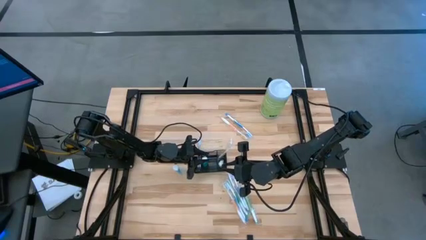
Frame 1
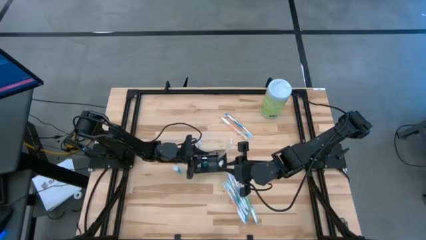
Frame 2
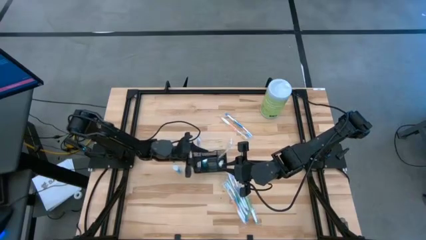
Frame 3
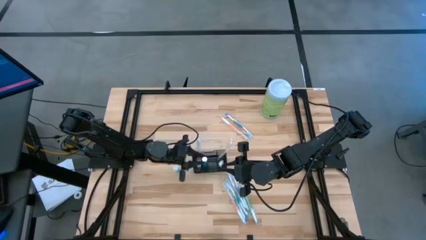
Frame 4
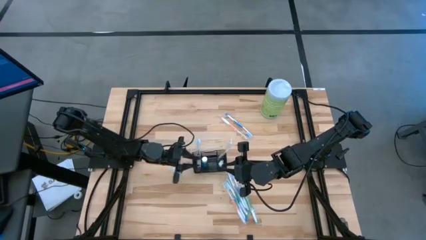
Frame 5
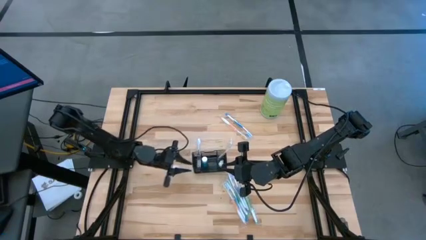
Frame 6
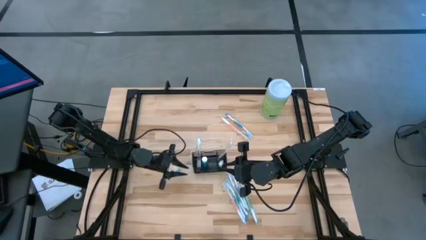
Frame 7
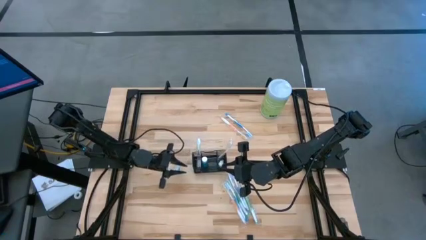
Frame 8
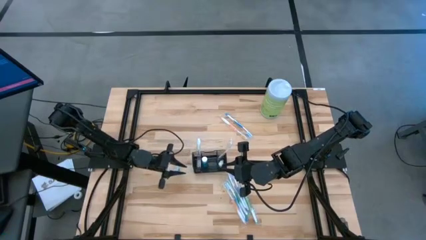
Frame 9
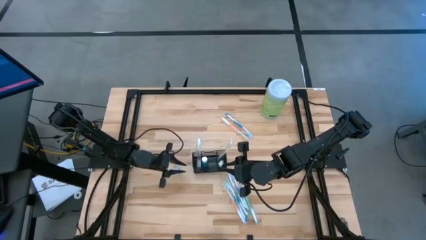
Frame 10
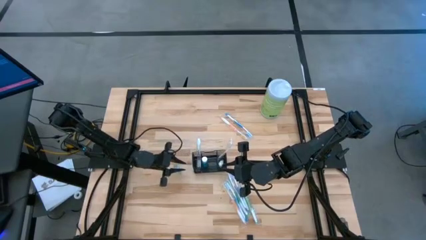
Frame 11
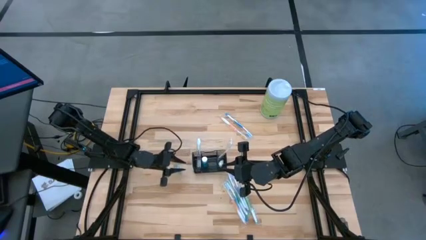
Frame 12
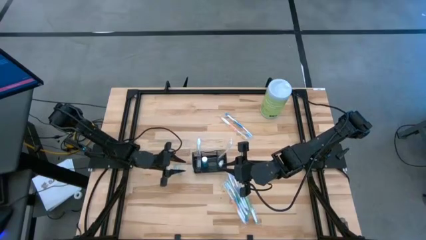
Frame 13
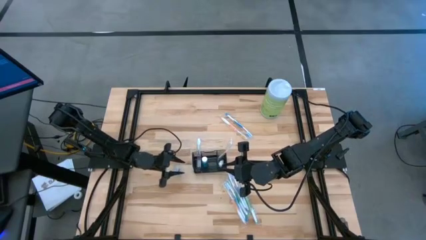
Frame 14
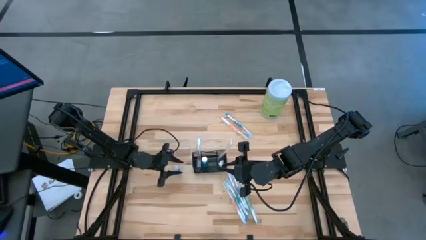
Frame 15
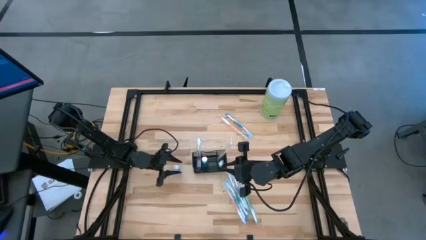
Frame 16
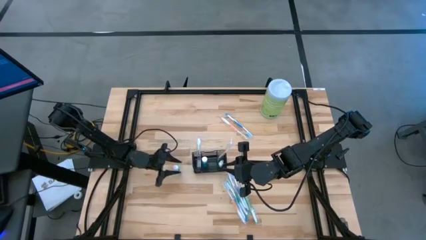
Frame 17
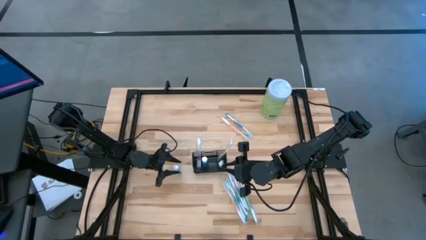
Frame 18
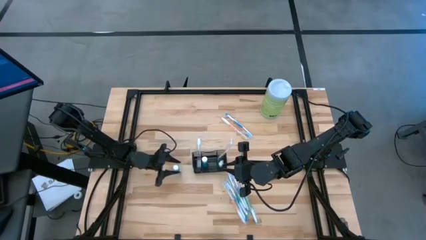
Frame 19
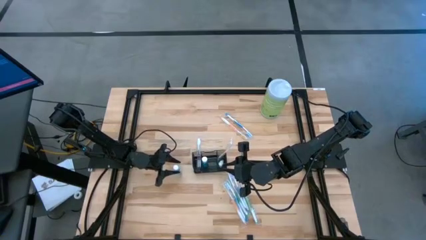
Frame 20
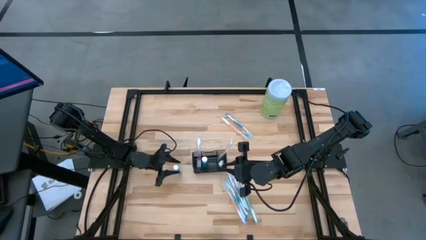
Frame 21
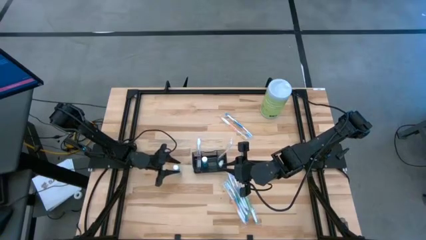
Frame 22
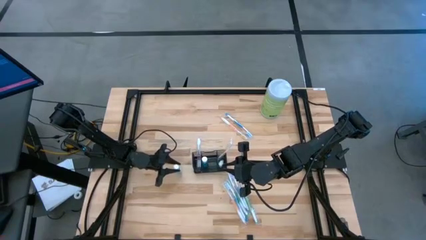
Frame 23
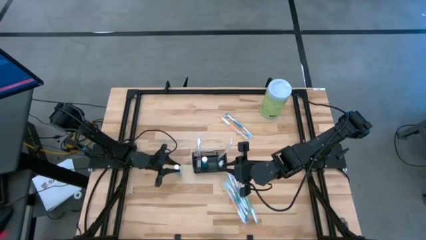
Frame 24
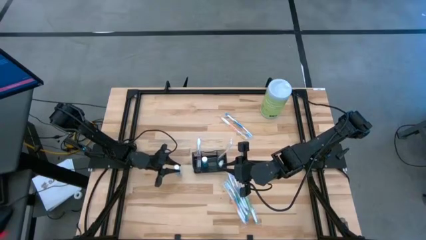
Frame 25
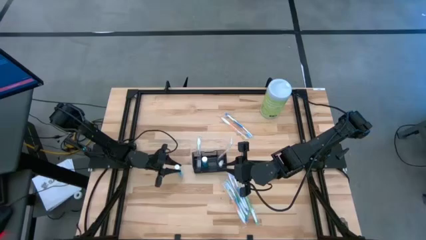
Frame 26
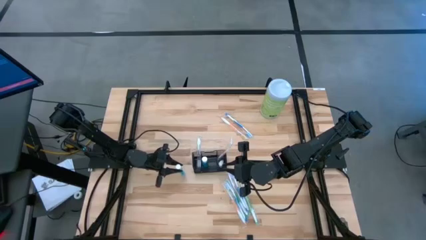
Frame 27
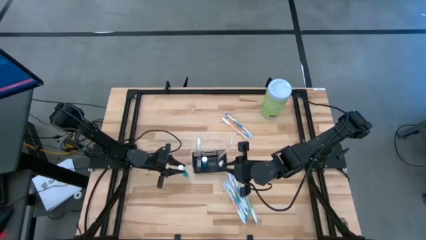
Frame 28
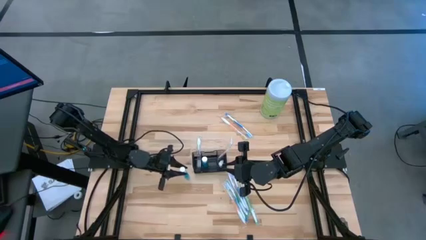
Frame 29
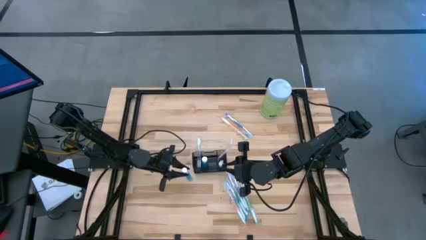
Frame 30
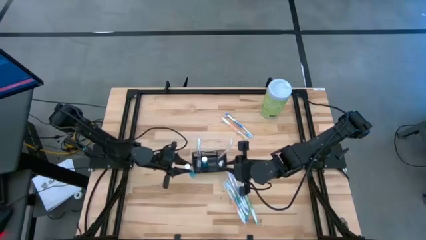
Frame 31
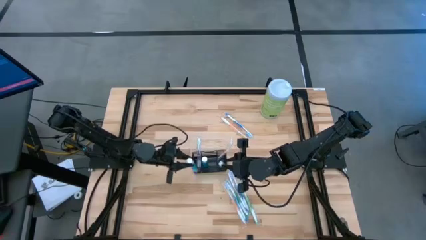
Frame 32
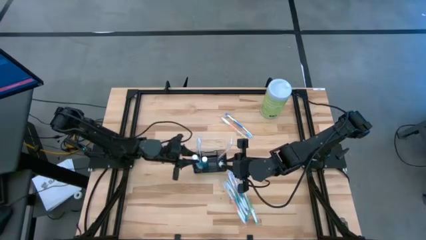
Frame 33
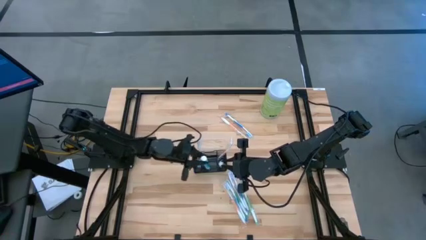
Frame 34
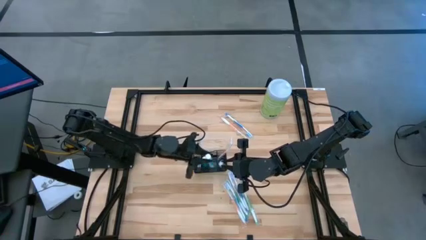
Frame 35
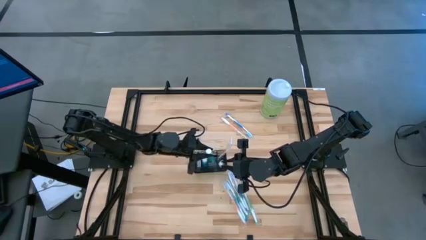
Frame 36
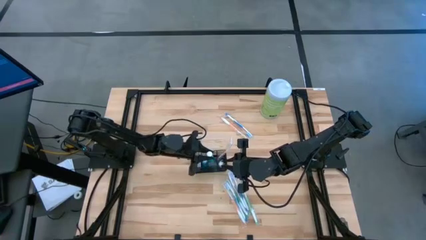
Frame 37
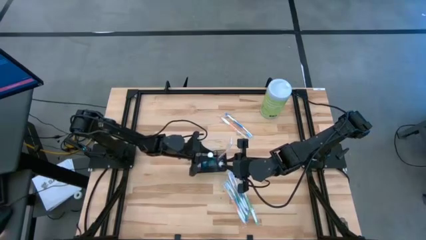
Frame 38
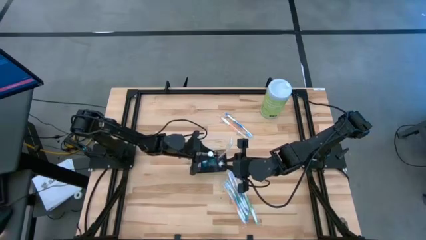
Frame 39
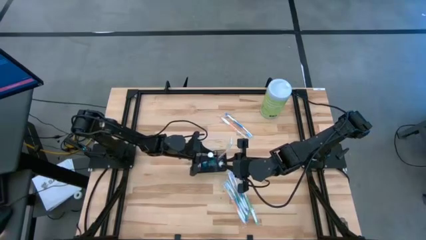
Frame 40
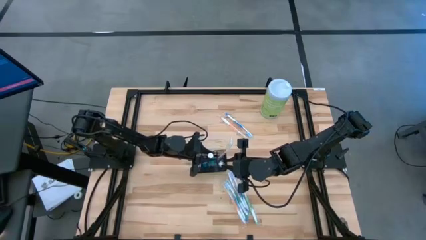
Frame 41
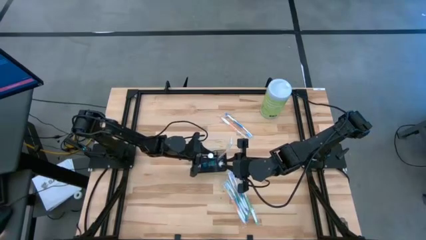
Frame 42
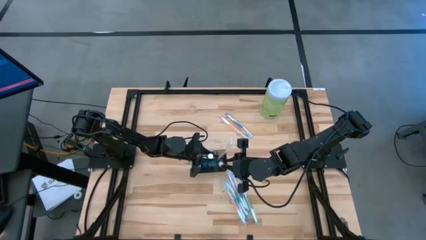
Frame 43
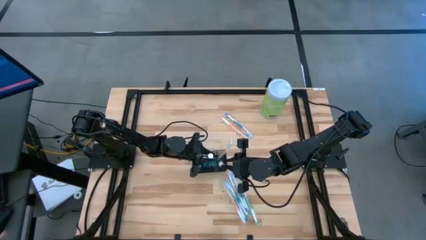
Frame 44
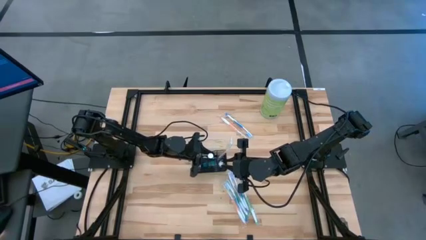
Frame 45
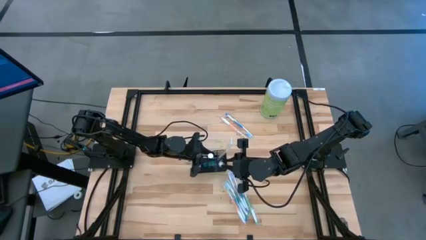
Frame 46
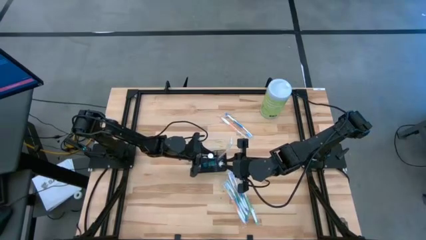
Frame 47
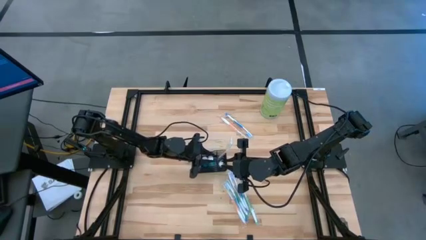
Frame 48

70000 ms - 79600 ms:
Task: Pick & Place toothbrushing station
Put the mouthwash bottle into the mesh

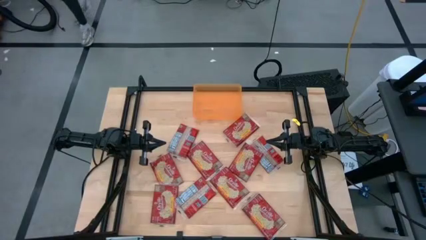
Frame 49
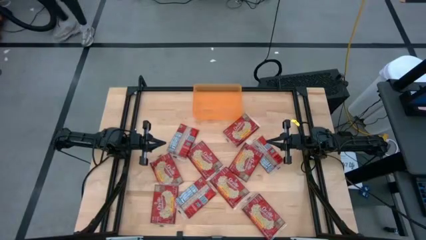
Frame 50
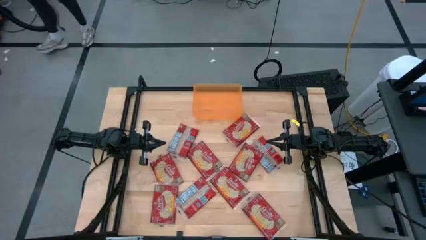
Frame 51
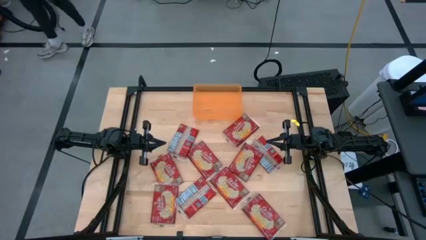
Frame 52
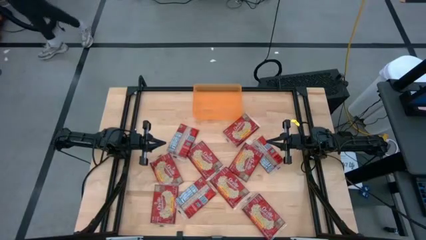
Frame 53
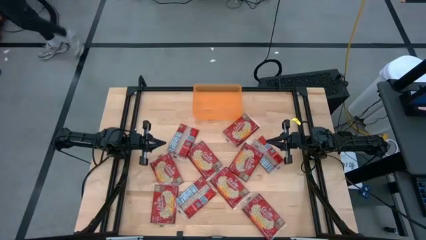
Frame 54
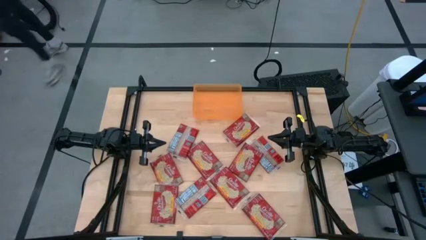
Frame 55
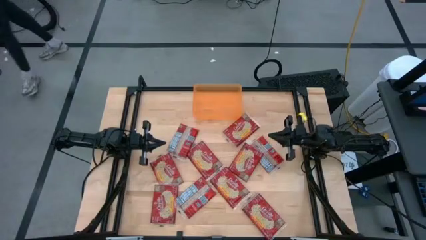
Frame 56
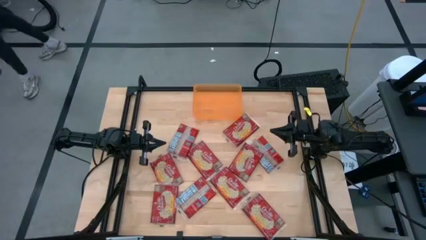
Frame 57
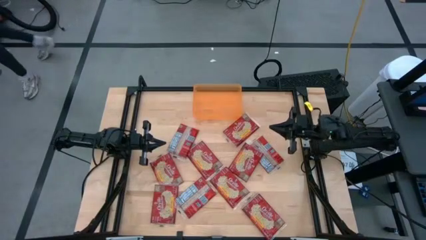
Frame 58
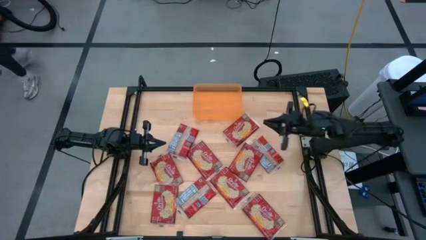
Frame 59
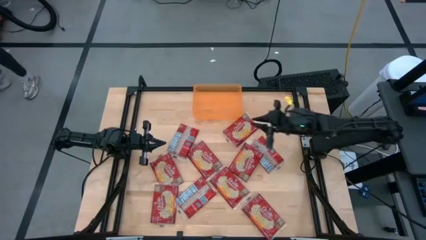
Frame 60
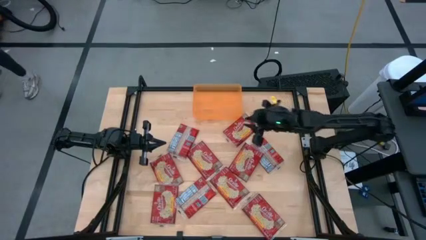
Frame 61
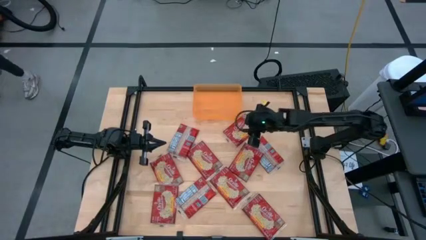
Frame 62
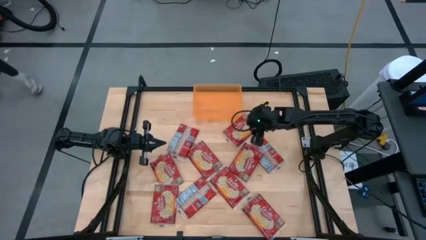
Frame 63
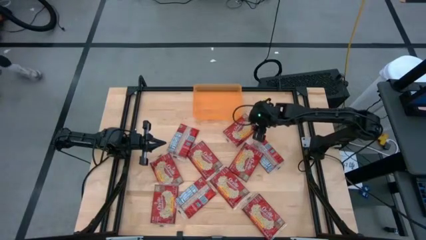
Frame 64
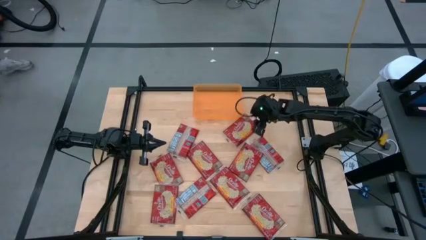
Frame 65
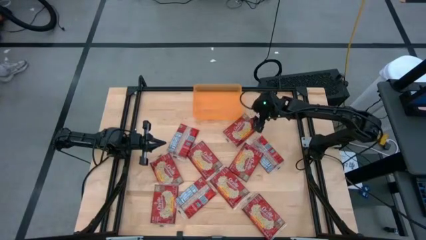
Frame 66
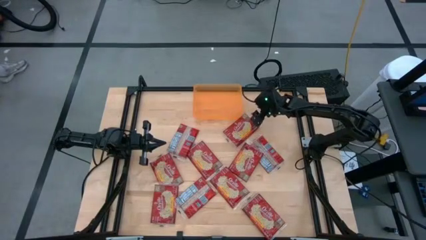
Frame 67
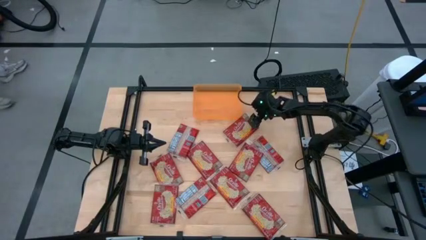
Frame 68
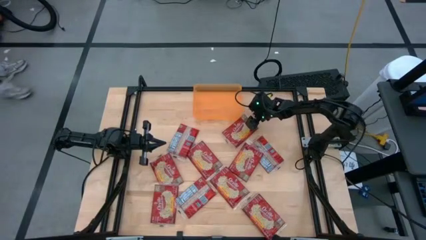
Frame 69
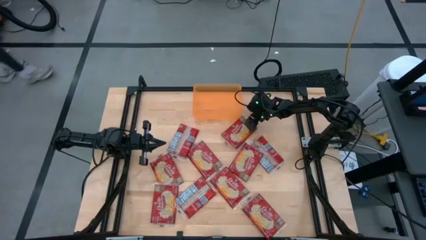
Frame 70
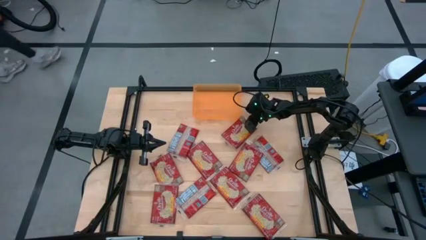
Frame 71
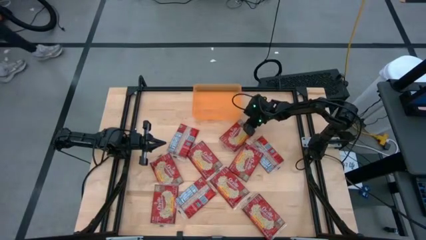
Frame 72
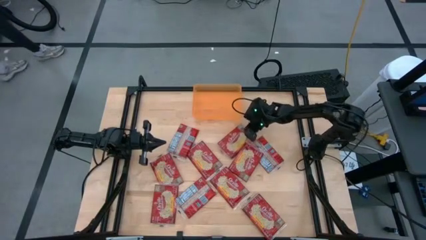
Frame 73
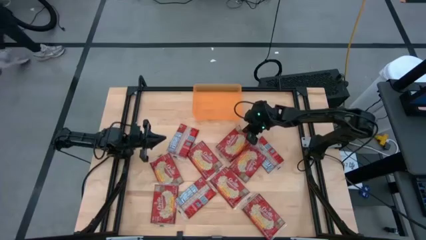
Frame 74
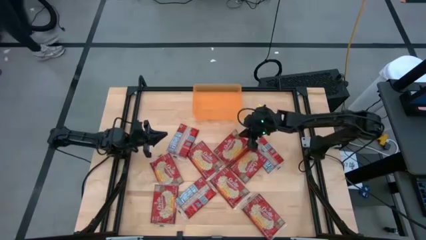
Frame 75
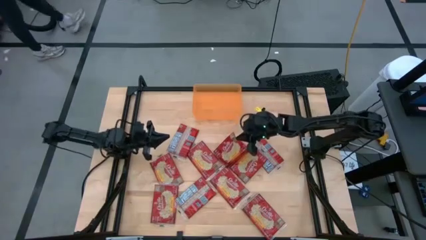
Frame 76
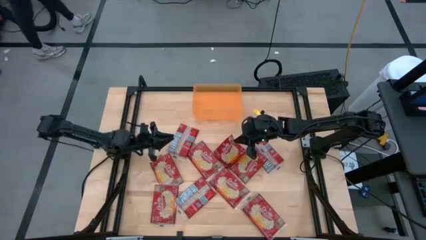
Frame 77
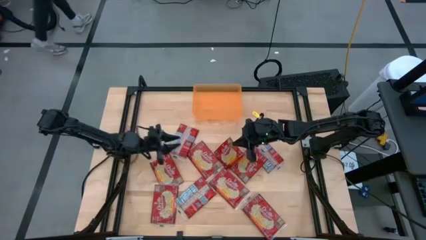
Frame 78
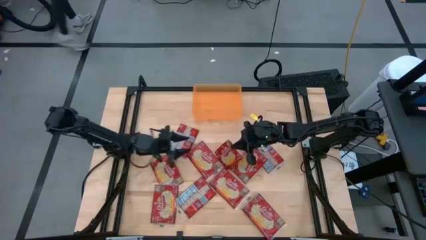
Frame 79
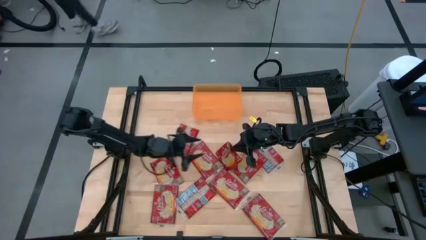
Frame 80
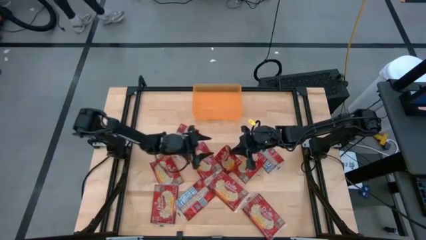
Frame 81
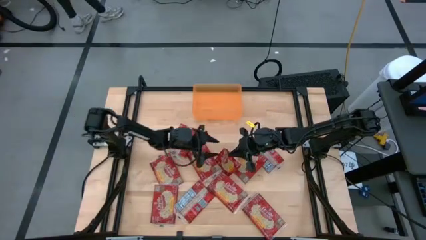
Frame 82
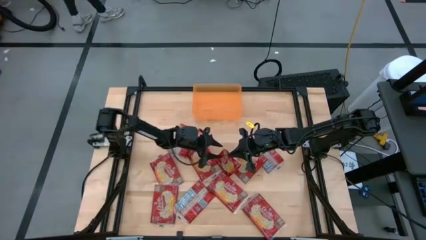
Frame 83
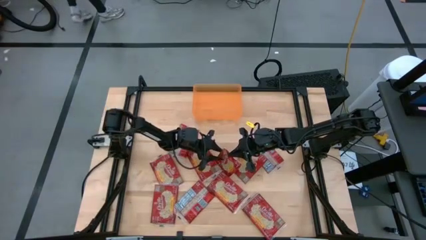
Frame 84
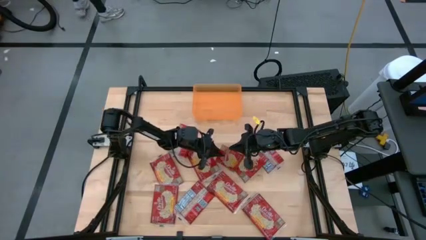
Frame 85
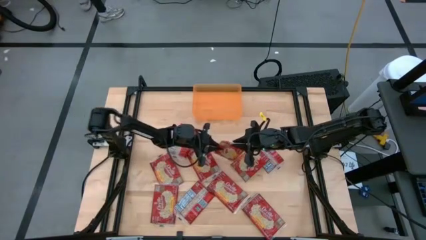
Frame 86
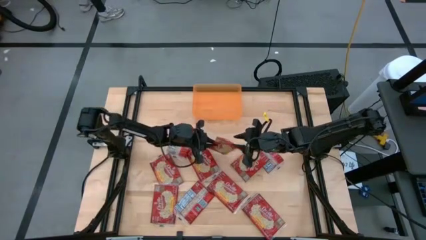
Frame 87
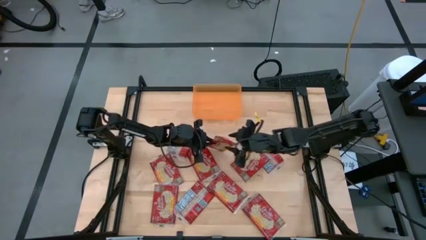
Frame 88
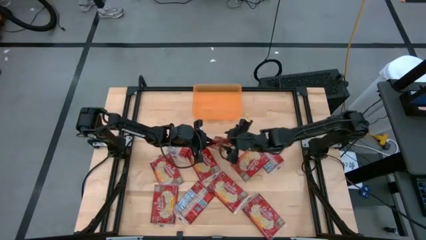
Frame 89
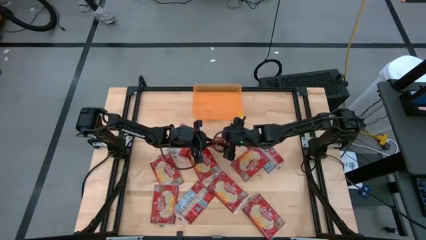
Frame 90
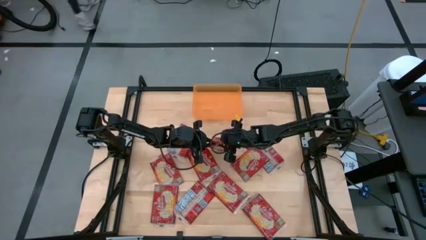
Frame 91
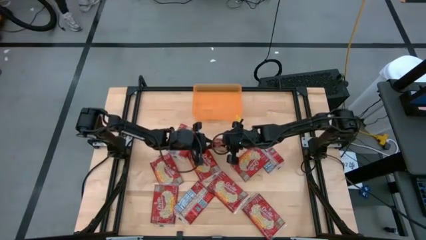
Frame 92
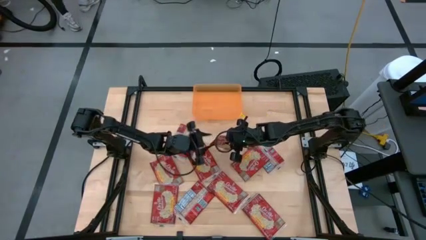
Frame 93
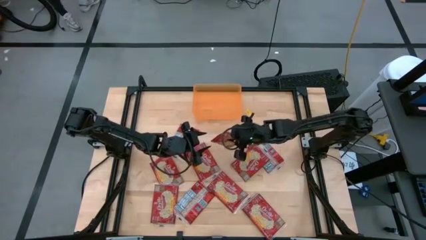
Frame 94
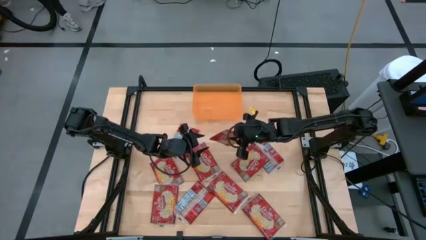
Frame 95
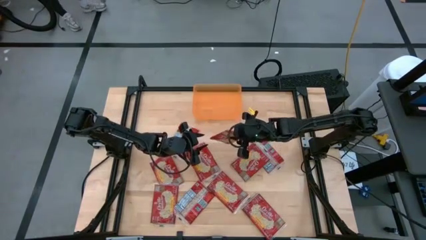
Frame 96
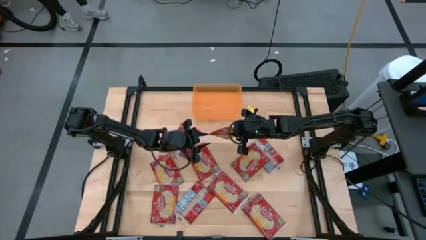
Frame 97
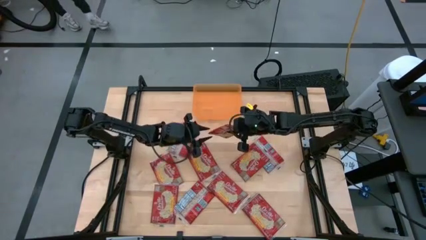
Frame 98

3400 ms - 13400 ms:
Task: Sort popcorn bags into baskets
Put the popcorn pack into the orange bin
